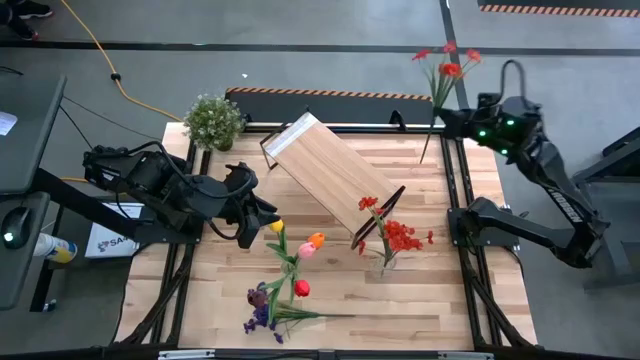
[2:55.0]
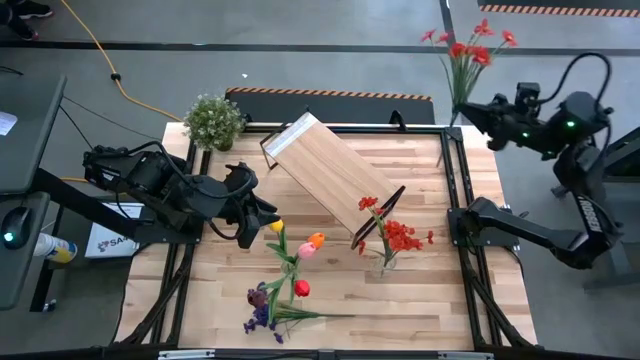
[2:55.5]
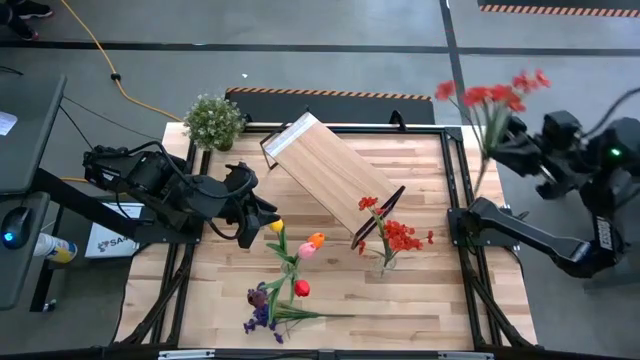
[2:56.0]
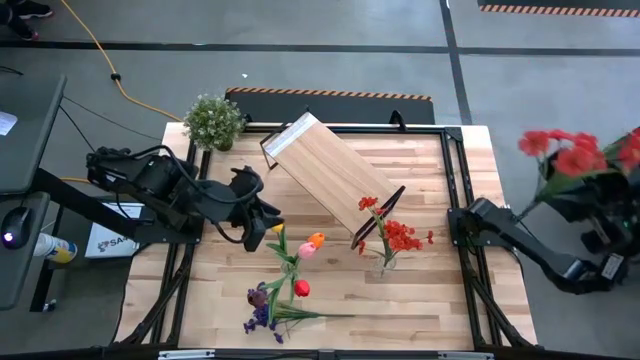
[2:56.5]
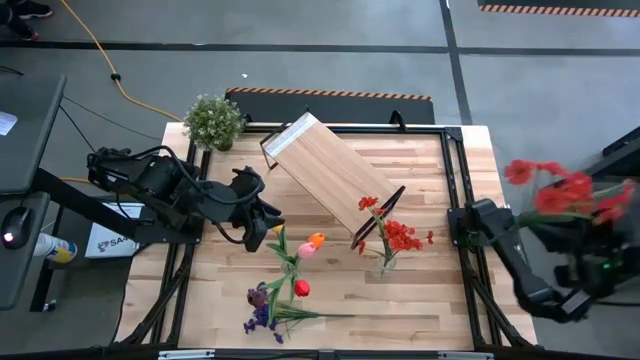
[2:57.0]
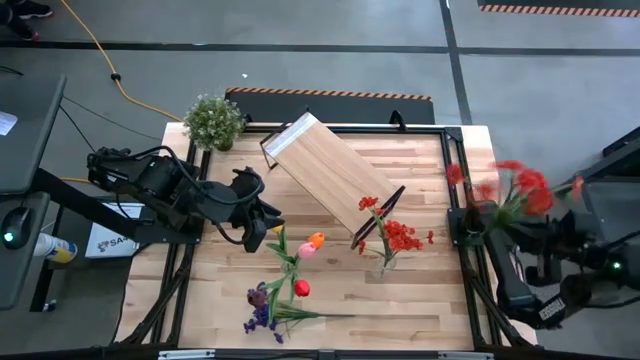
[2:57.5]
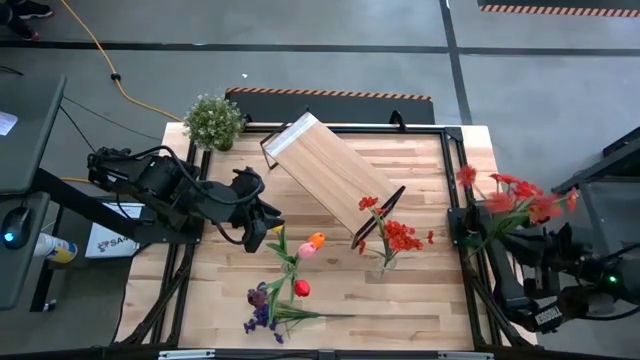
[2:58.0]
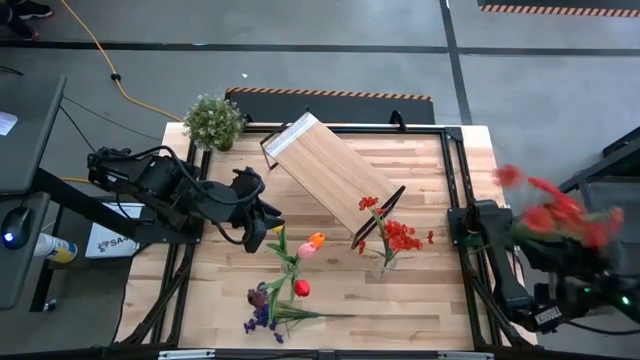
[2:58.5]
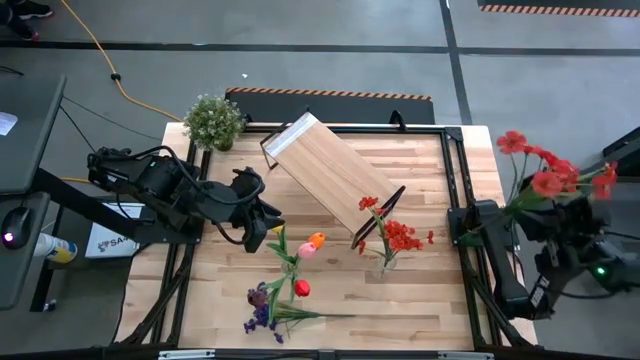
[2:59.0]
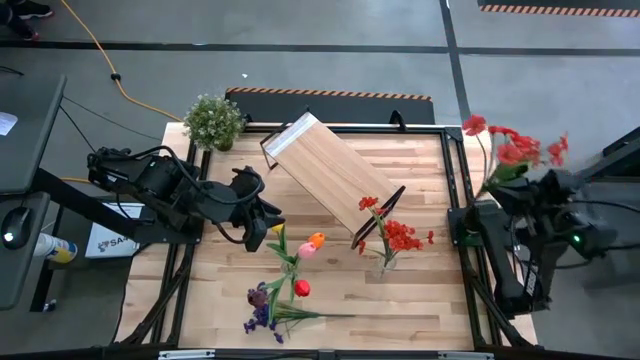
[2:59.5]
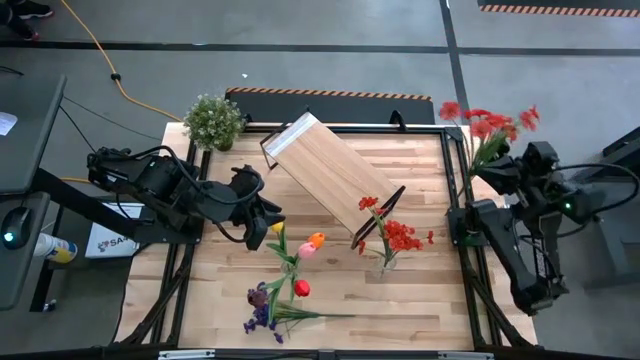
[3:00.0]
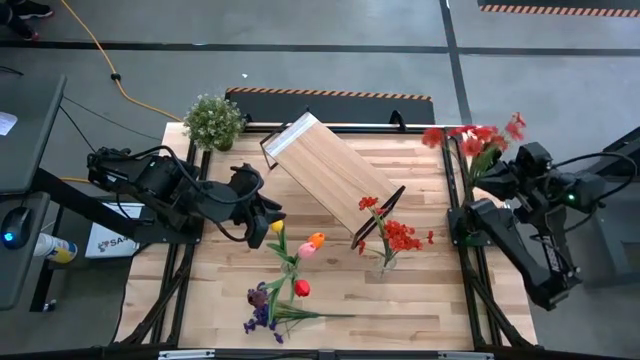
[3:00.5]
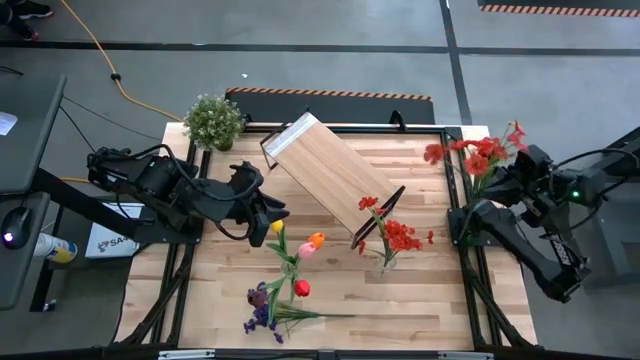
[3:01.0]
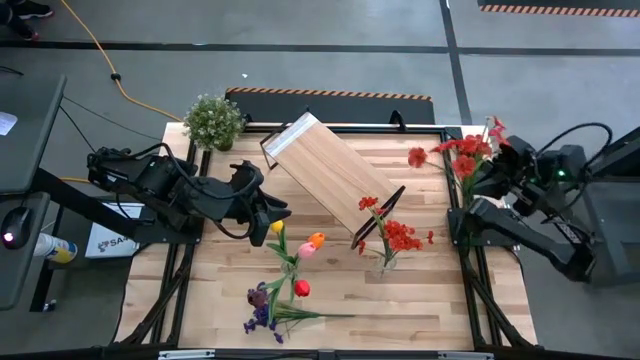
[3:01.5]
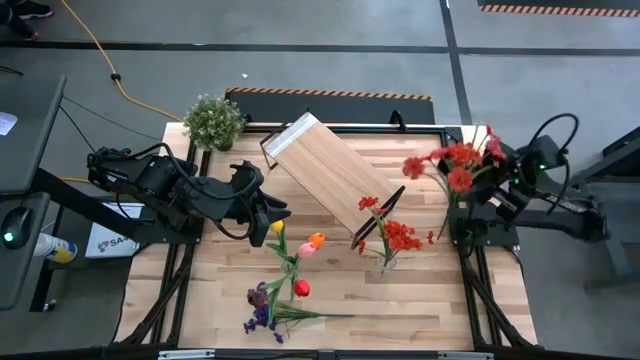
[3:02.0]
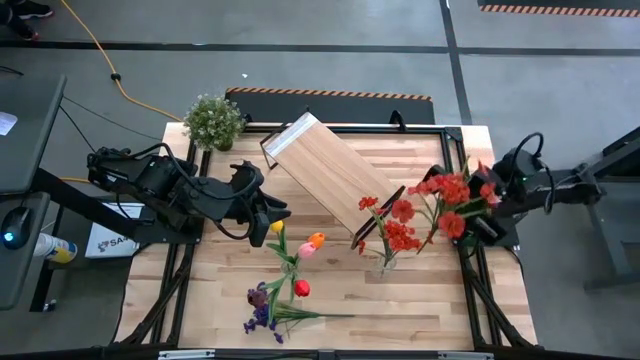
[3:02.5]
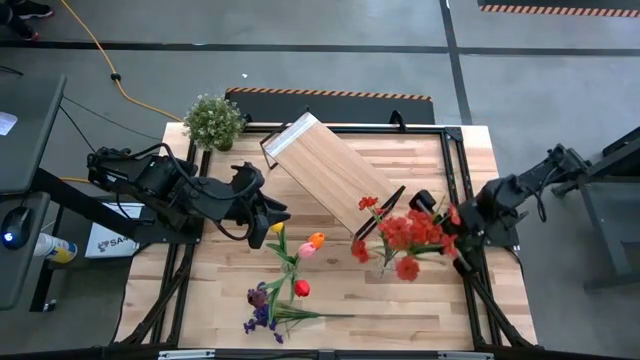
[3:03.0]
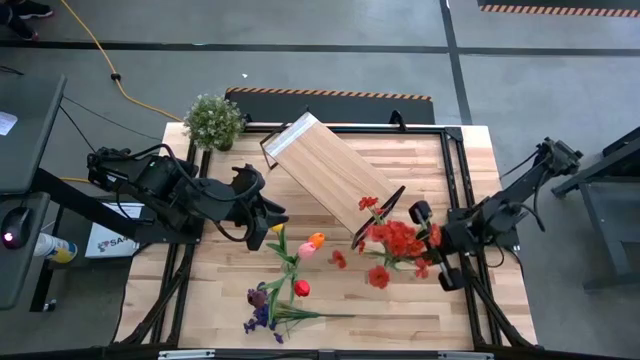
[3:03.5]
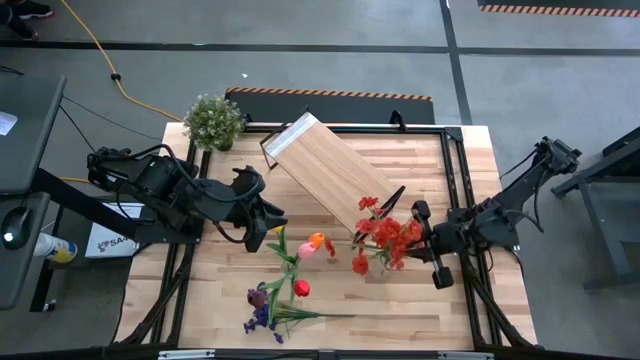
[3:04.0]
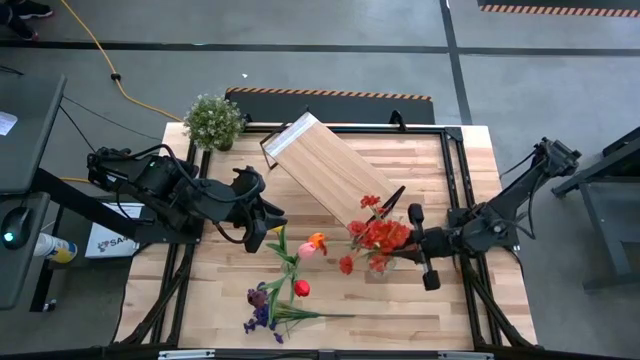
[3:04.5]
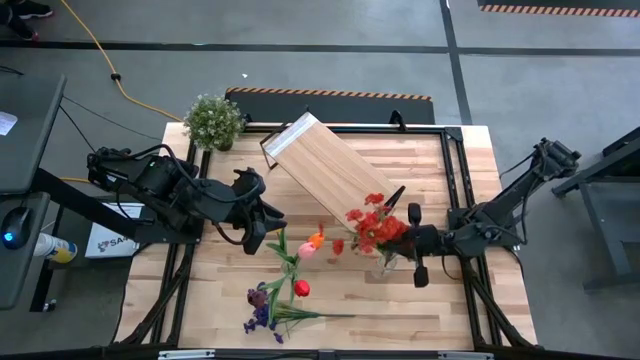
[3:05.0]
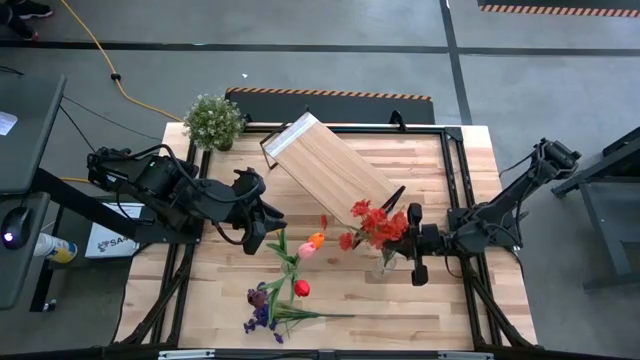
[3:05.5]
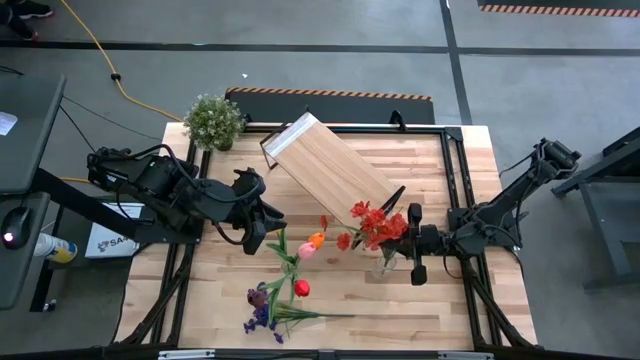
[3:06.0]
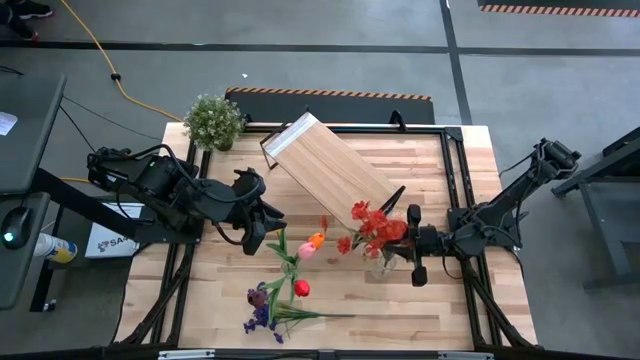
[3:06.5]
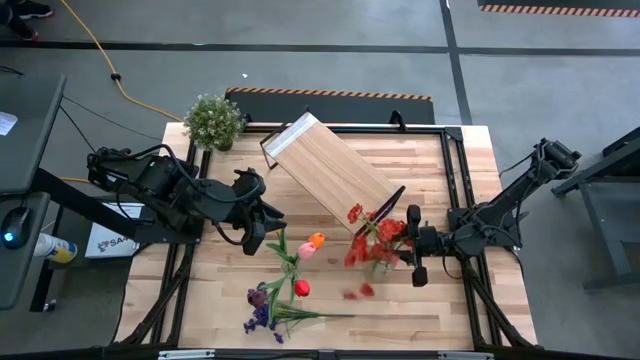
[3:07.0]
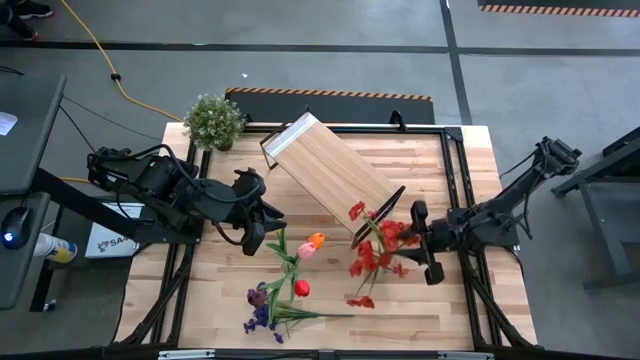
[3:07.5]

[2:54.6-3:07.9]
Task: Pick and place flowers into a vace then onto a shelf
Put the orange flowers into the right transparent vase

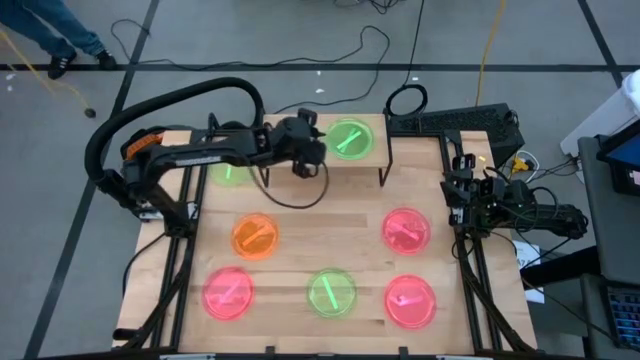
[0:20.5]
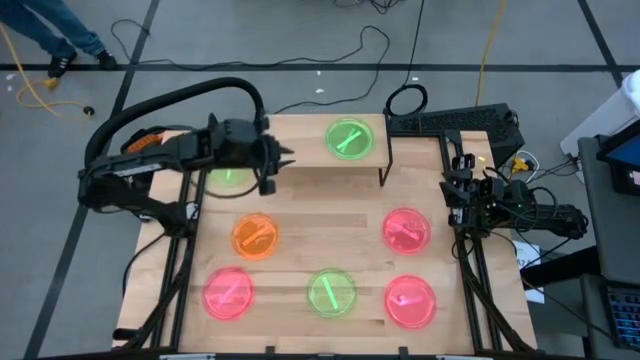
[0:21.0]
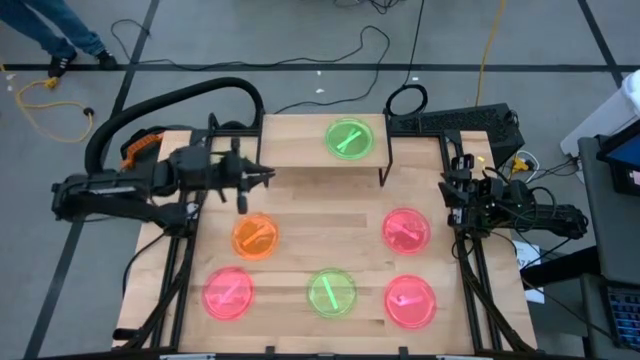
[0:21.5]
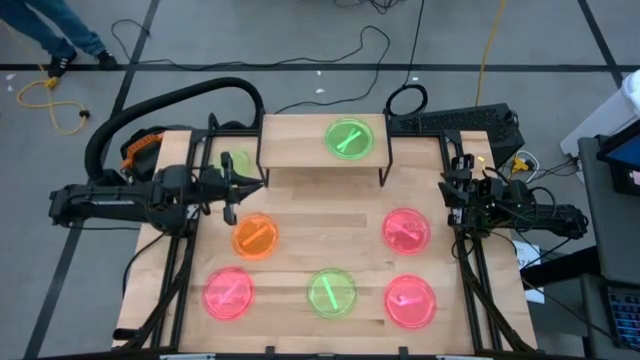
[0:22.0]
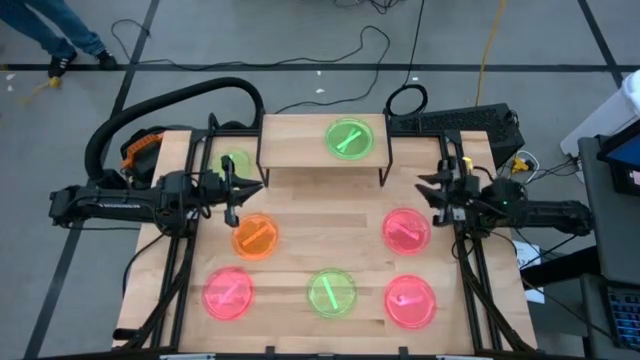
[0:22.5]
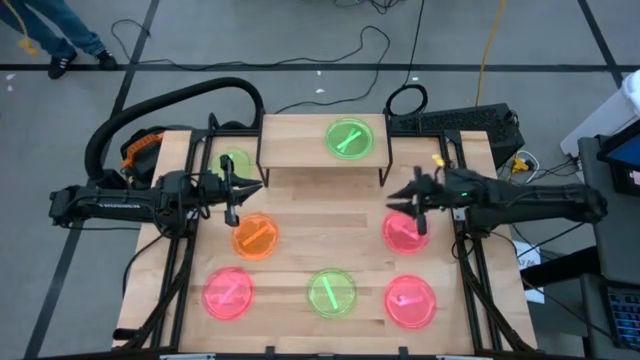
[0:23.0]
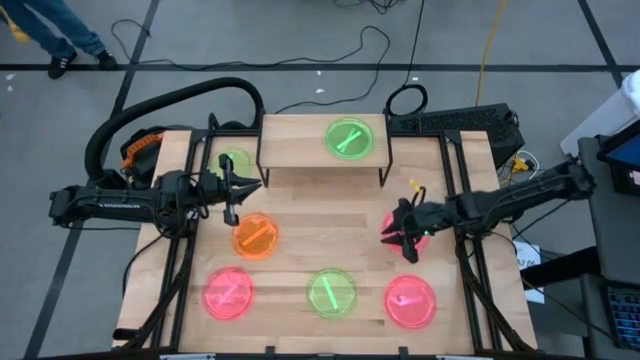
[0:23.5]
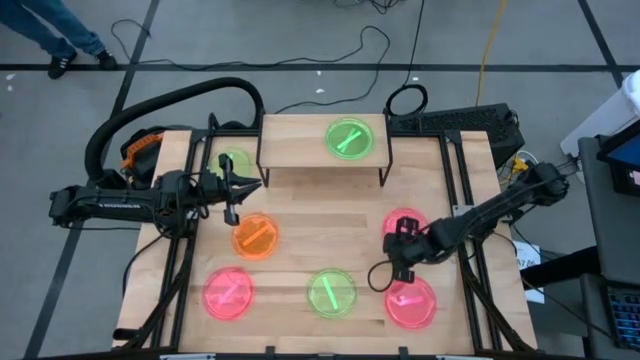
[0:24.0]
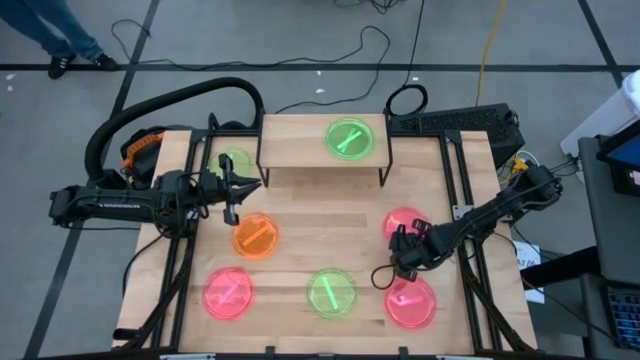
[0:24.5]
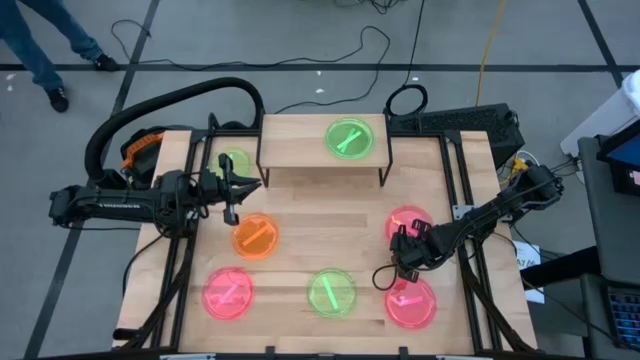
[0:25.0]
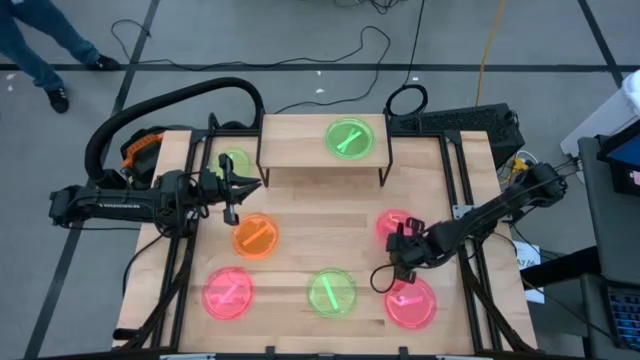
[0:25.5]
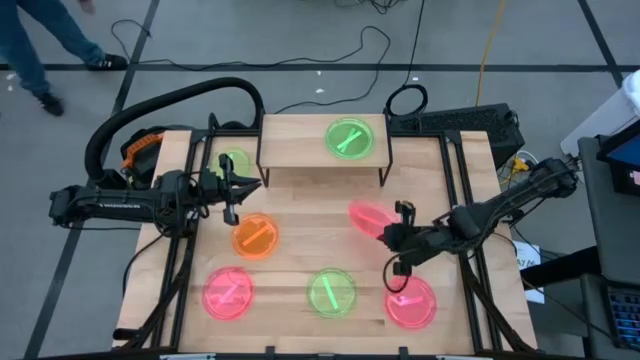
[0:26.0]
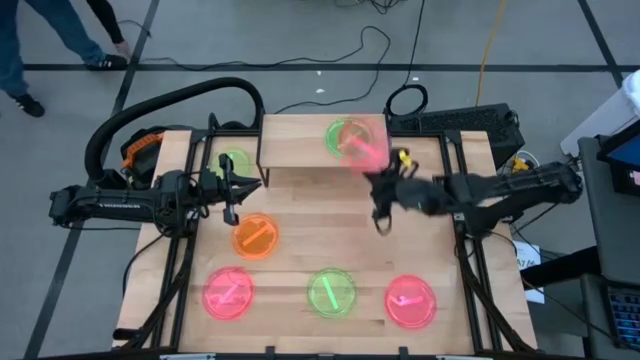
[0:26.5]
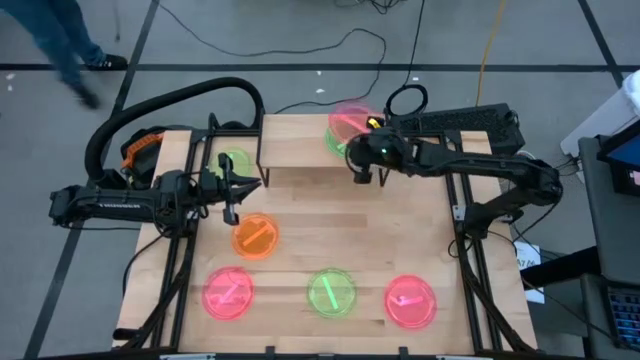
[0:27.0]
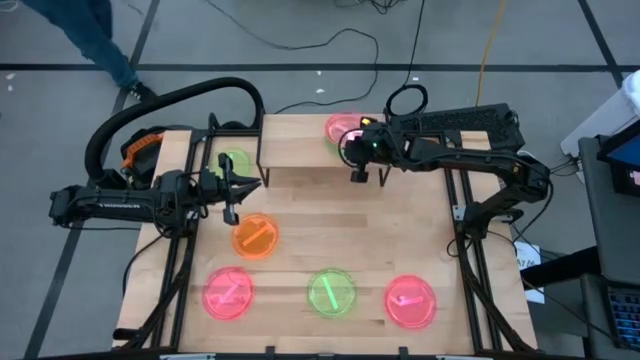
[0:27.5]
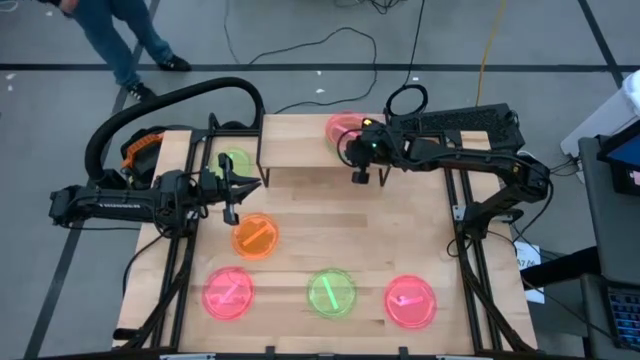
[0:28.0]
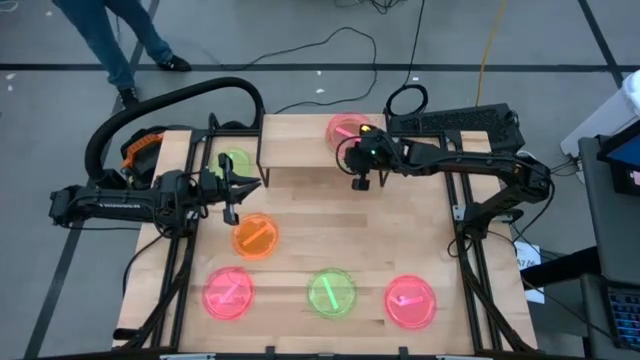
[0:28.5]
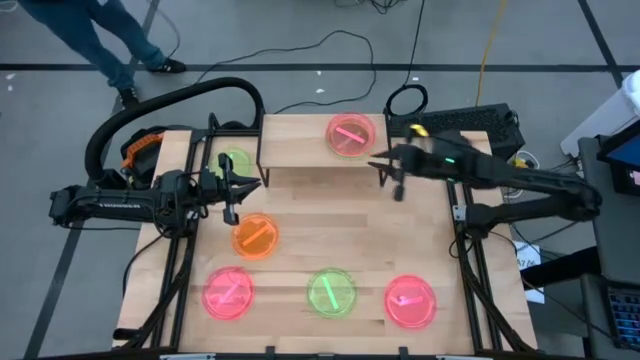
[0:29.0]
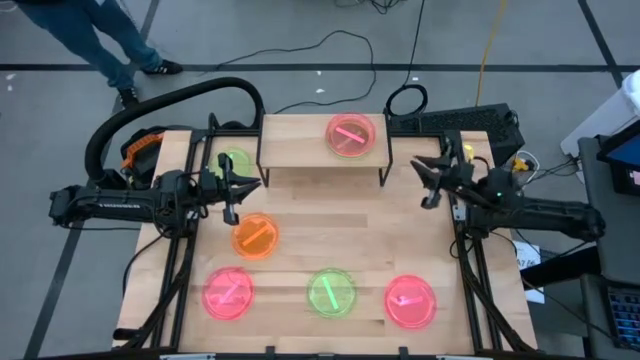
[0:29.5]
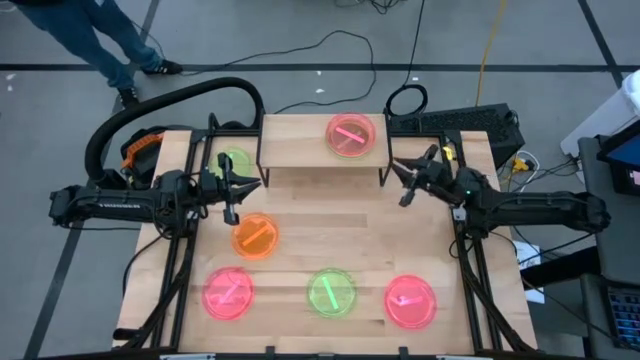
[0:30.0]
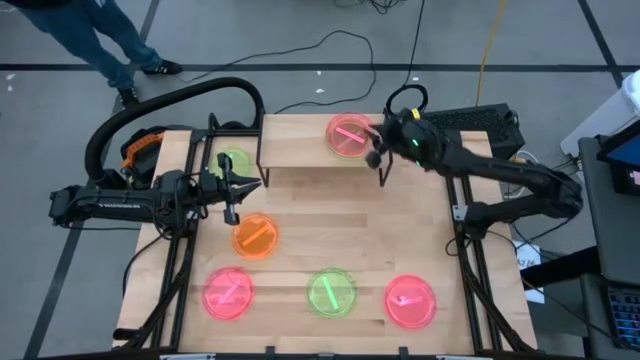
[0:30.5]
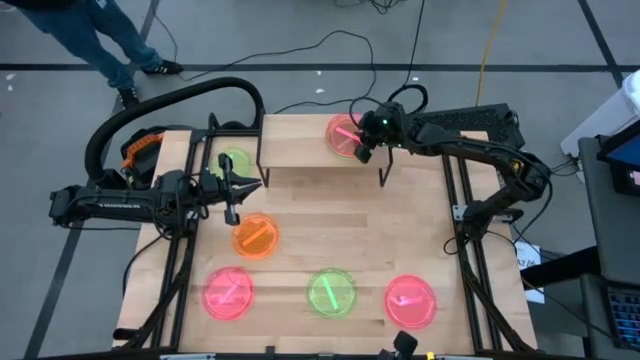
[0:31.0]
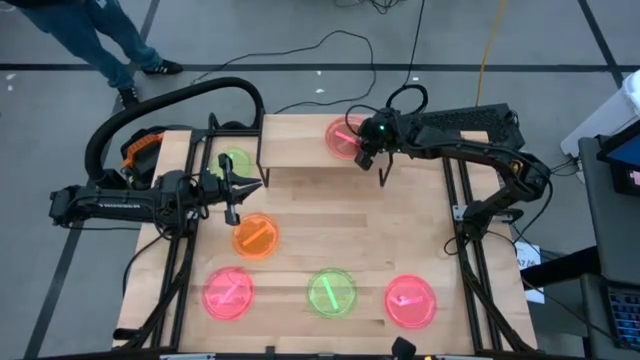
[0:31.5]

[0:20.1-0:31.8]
Task: Place and stack plates onto a shelf
Stack the pink plate on top of the green plate on the shelf
